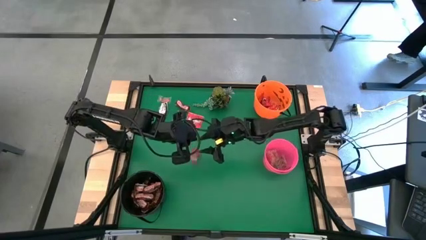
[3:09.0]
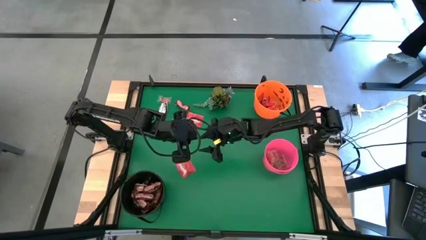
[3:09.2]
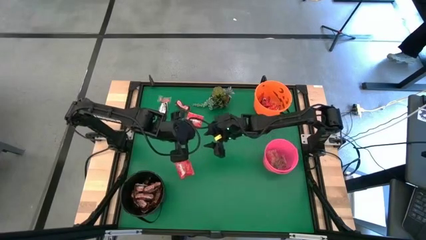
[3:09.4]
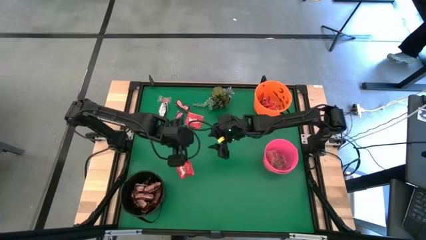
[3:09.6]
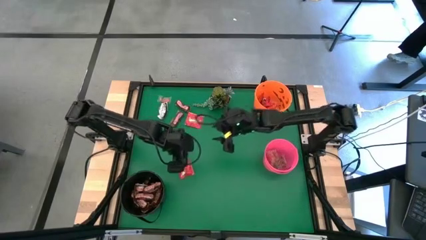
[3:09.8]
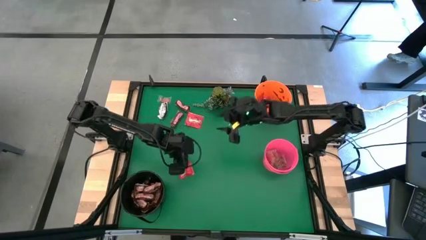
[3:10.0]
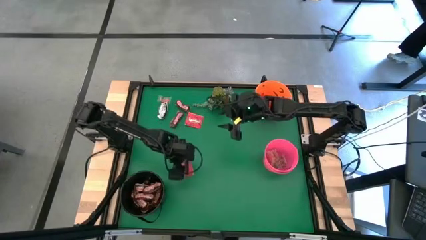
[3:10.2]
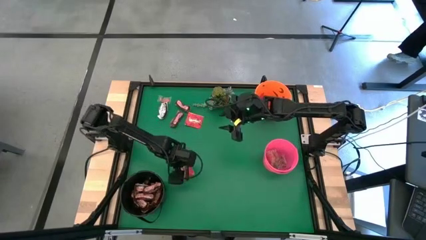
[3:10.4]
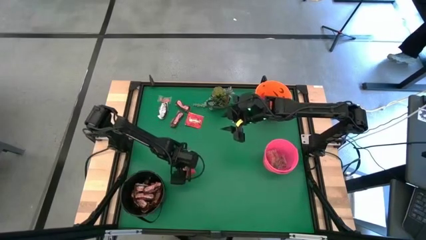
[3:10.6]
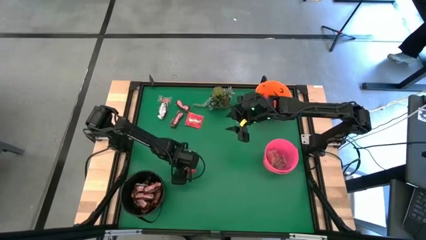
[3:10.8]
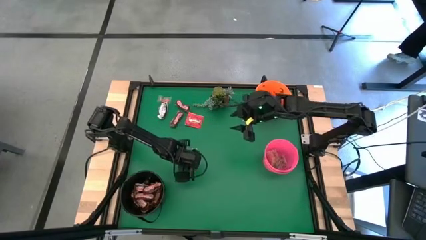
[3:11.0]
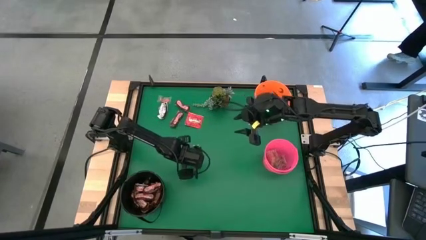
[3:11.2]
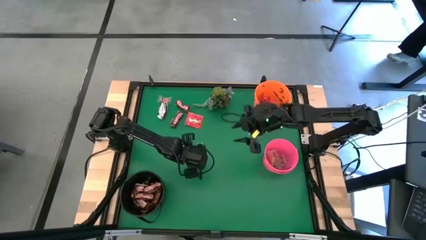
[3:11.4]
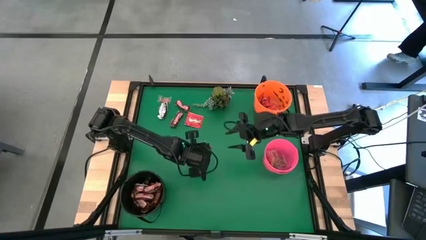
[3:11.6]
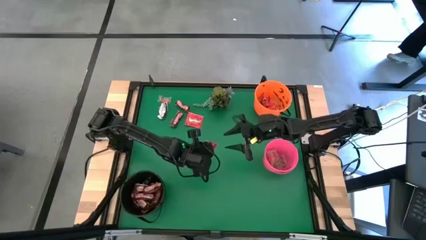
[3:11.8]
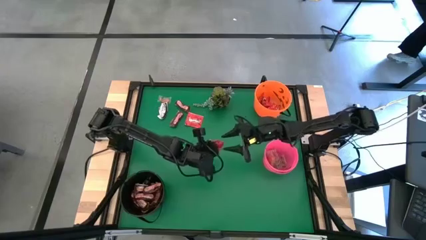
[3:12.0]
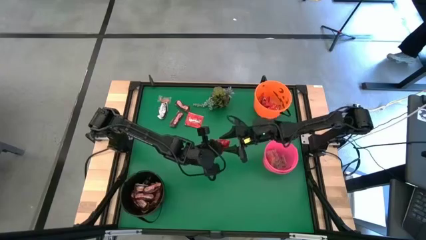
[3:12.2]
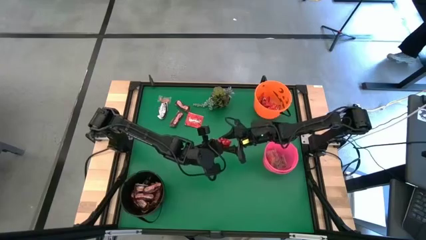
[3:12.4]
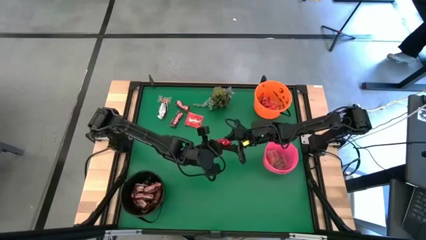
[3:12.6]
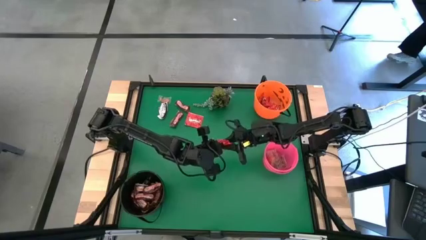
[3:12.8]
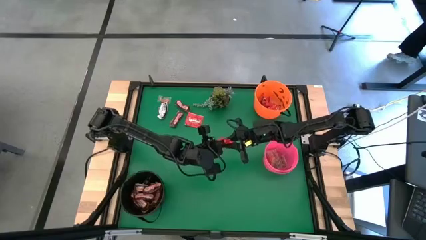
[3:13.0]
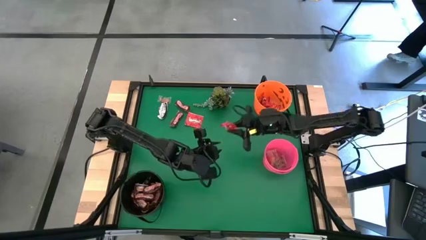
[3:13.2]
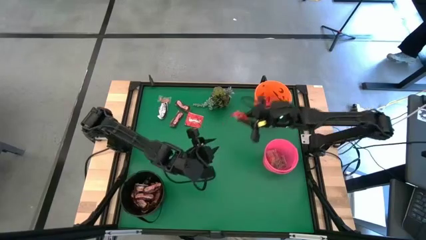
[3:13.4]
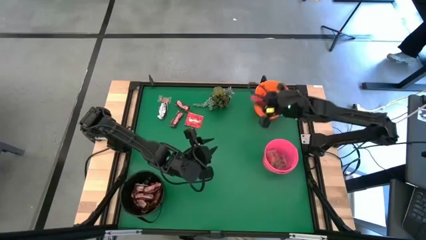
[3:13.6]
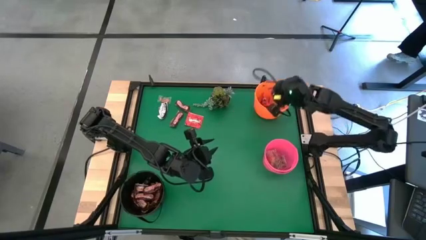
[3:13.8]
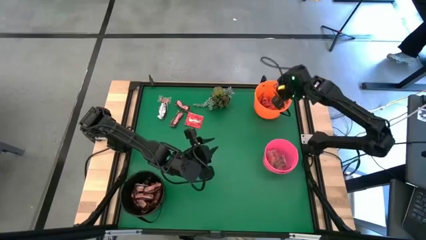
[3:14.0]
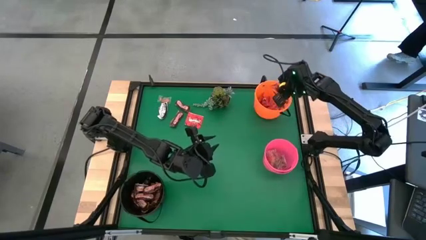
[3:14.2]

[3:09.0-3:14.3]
Task: Sort candy
Put the red candy into the orange bucket

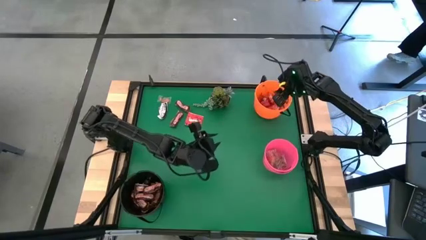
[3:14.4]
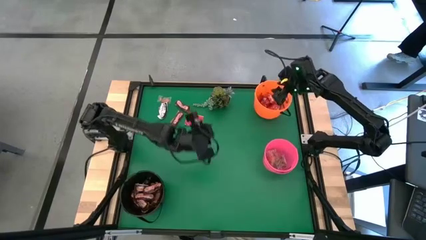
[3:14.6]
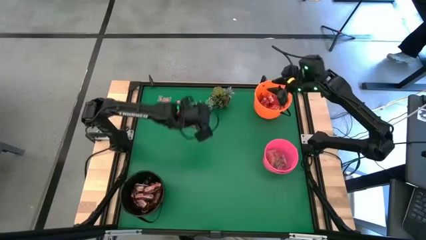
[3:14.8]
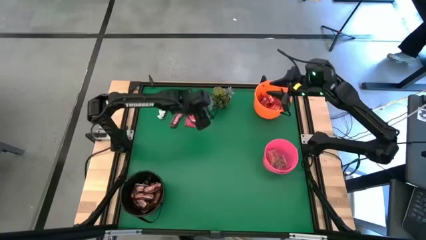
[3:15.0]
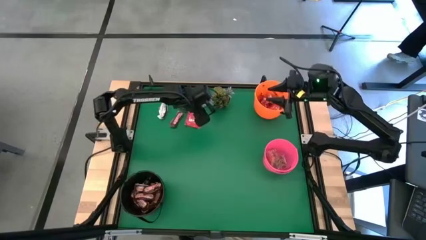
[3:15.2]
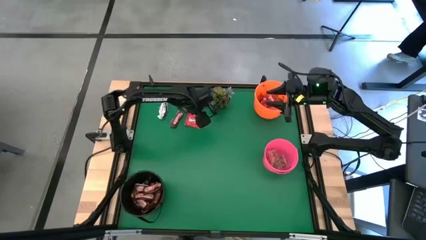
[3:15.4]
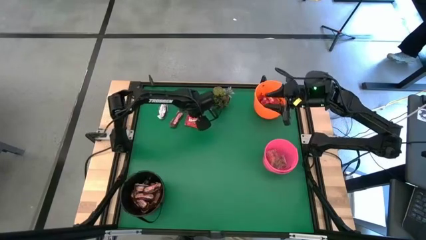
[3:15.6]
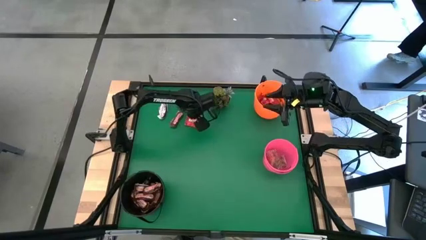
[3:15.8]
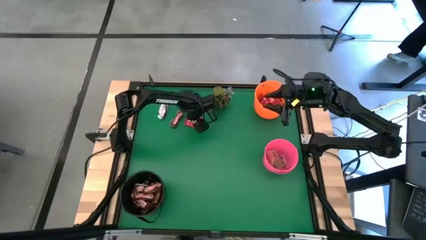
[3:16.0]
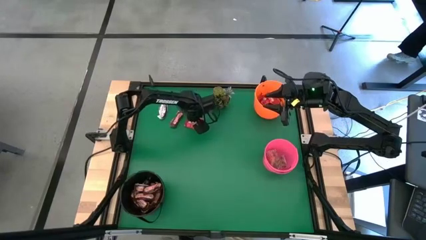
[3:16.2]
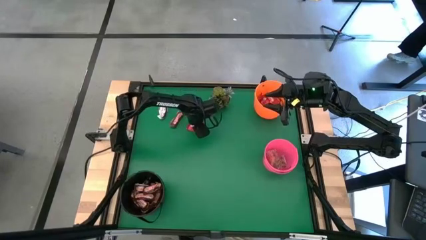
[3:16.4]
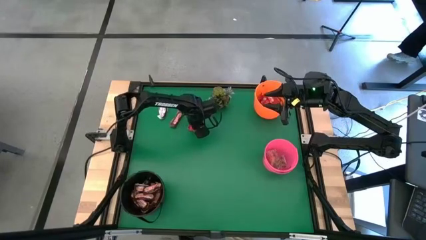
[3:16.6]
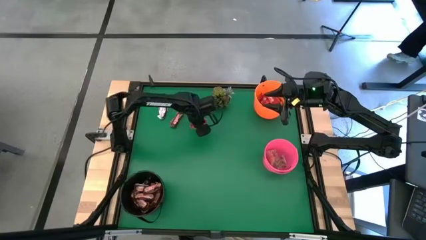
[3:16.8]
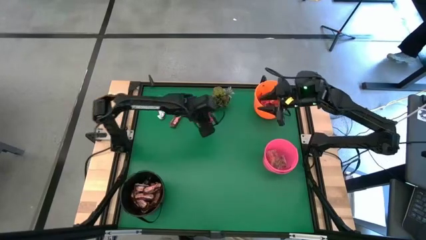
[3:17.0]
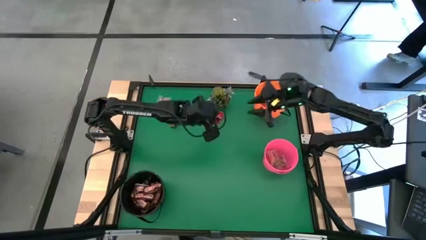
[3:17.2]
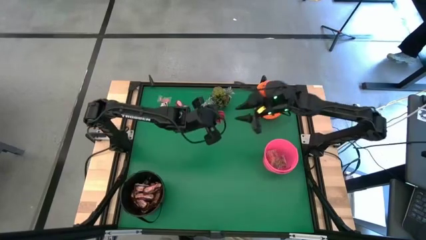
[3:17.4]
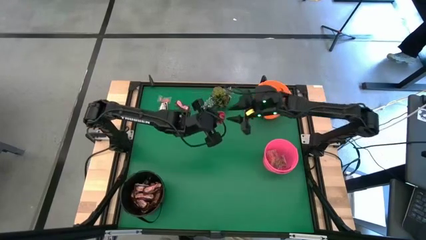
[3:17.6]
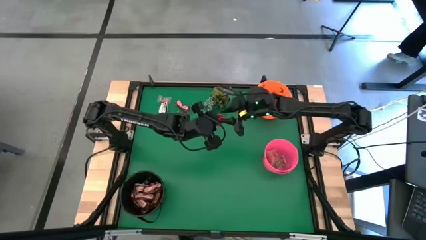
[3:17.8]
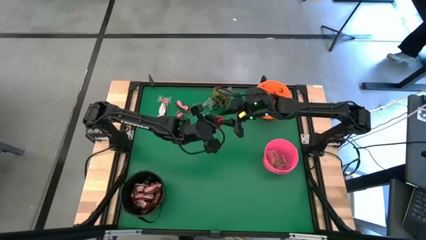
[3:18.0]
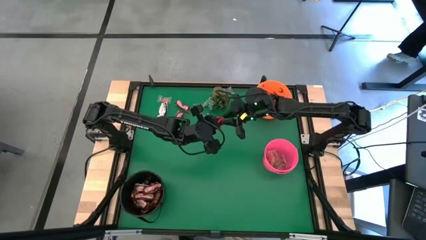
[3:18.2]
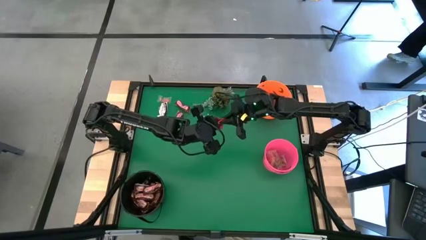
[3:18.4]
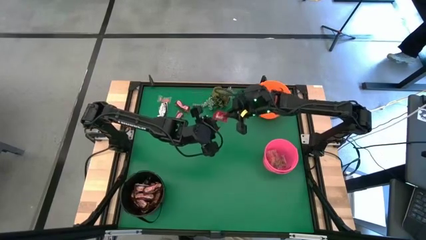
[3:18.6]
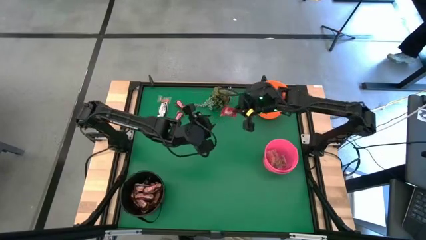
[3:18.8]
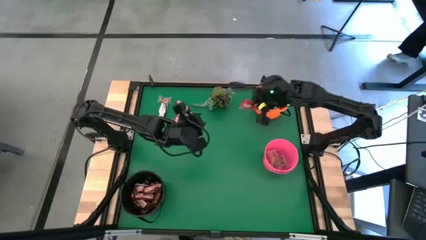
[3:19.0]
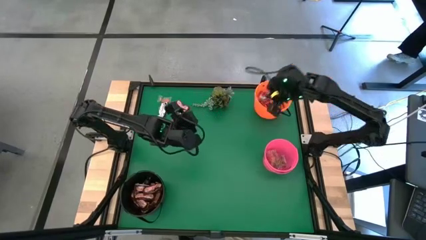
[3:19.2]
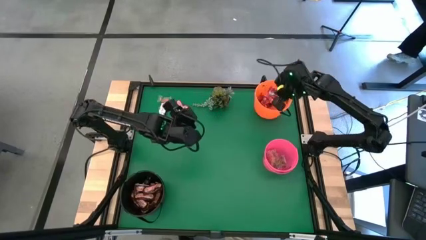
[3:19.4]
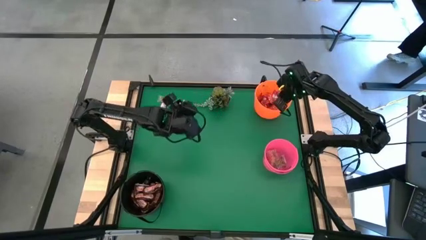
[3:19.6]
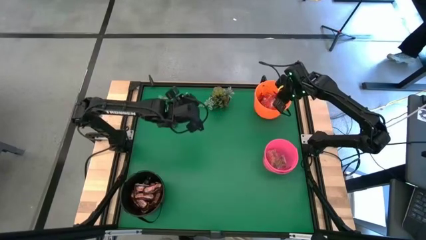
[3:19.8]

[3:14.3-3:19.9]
Put the red candy into the orange bucket

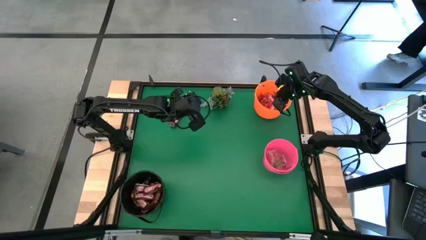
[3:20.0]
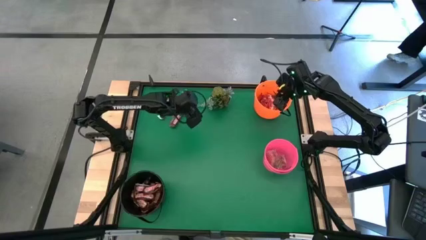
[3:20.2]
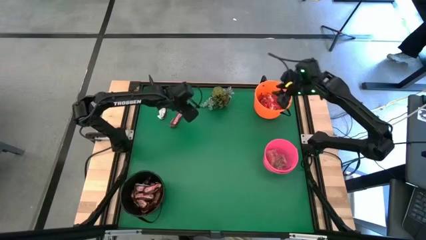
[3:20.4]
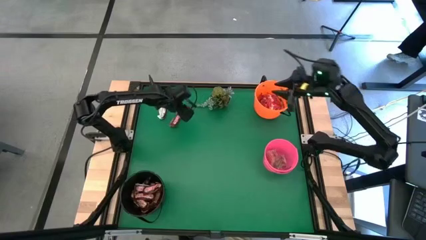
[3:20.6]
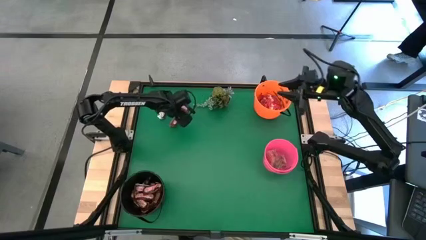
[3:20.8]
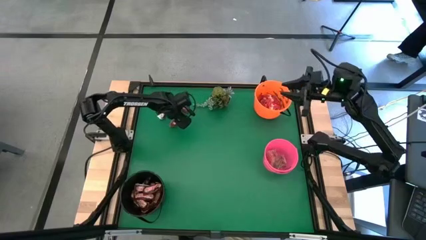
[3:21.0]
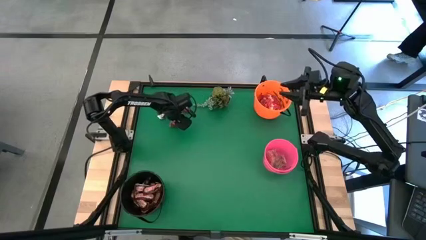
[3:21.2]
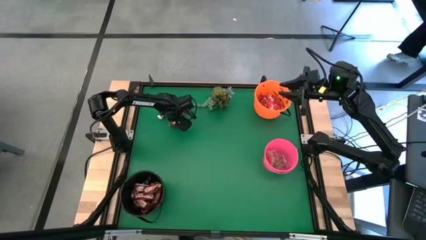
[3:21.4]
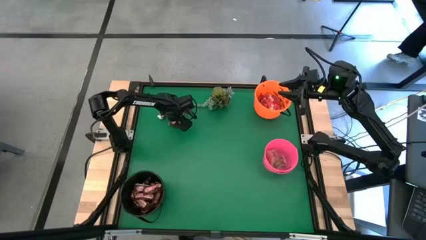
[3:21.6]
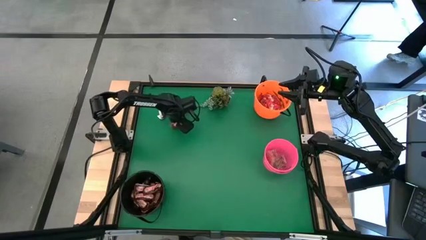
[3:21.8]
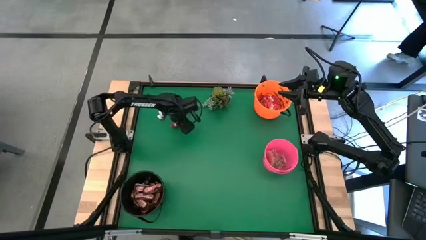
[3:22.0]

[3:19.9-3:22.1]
Put the brown chocolate bar into the black bucket

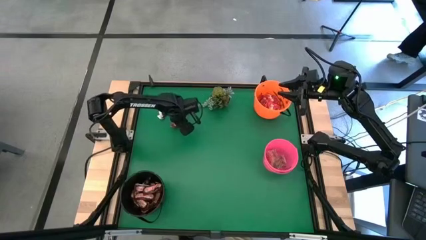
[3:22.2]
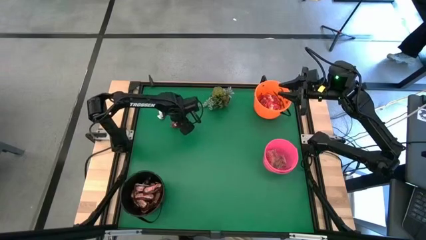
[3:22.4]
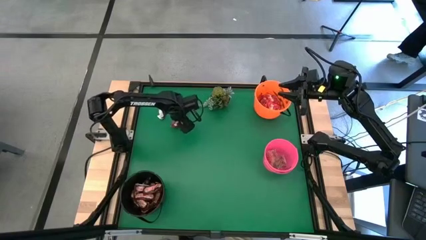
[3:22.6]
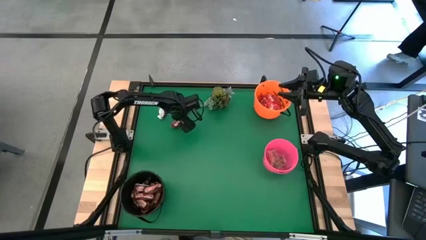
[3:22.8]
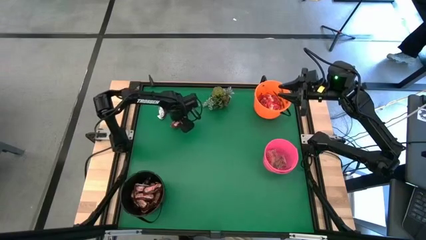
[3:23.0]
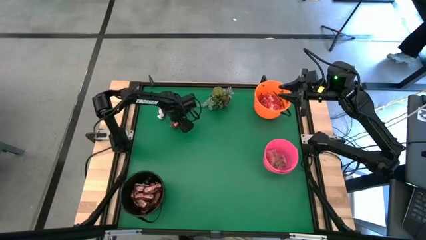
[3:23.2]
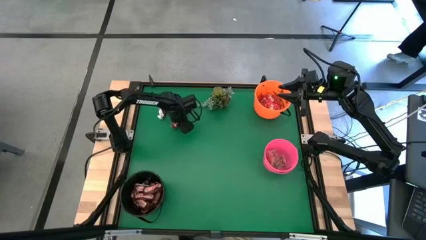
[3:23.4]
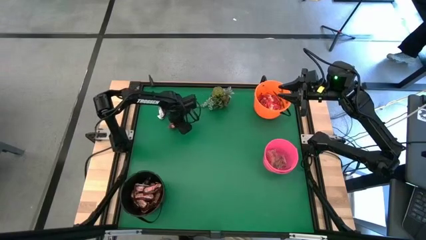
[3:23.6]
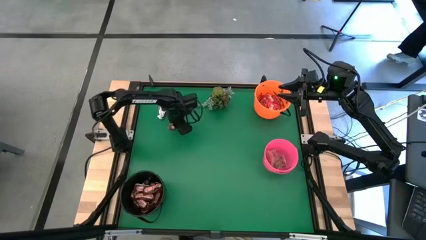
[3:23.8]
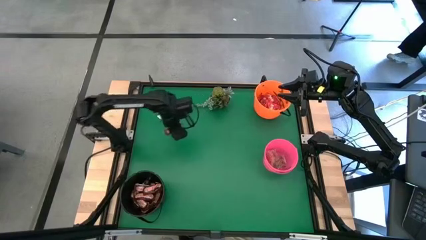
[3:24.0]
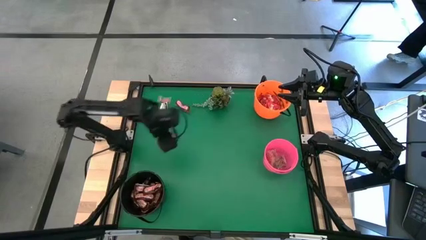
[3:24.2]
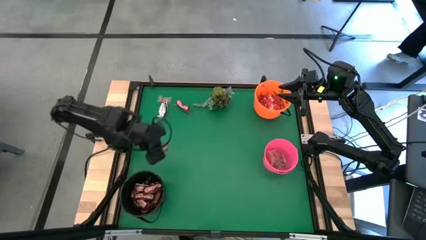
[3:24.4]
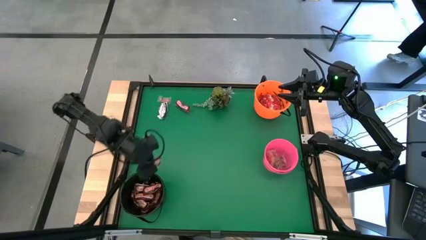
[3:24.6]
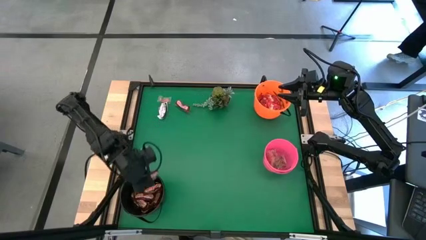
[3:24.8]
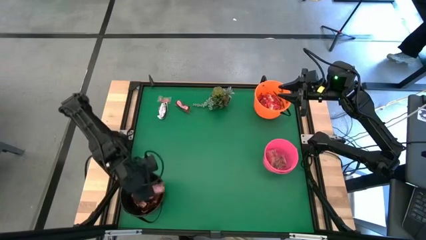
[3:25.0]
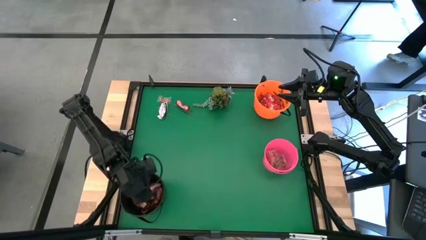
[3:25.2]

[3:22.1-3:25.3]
Put the brown chocolate bar into the black bucket

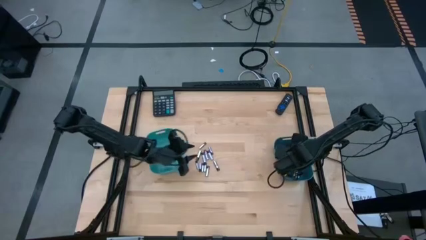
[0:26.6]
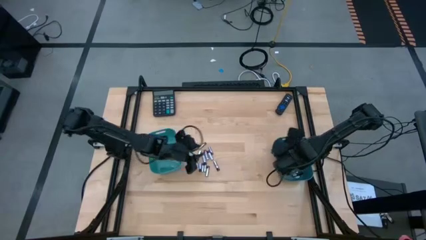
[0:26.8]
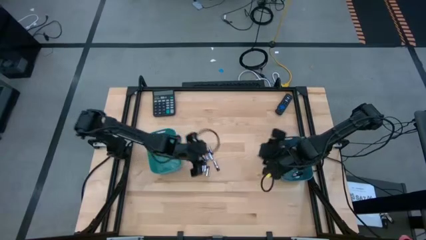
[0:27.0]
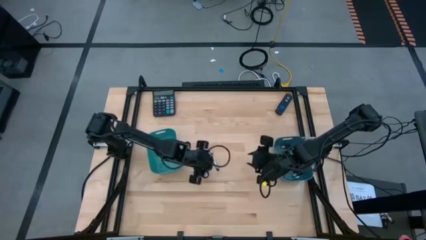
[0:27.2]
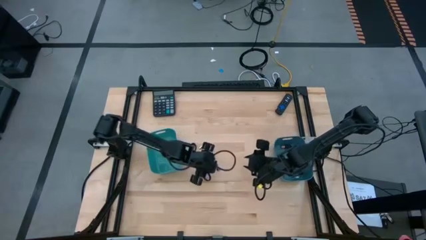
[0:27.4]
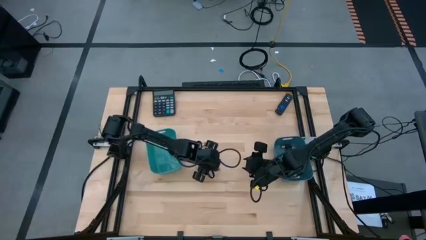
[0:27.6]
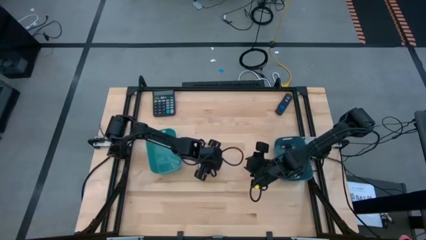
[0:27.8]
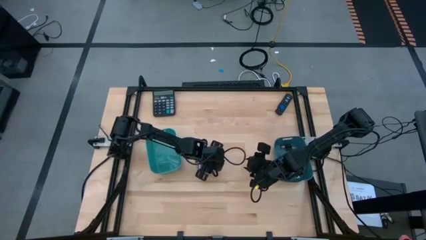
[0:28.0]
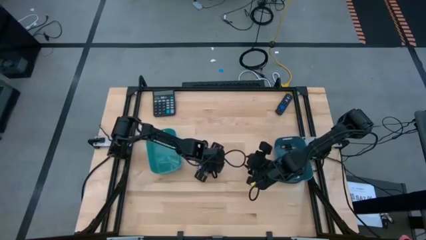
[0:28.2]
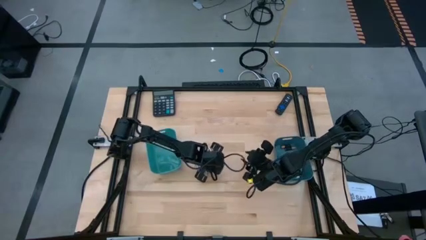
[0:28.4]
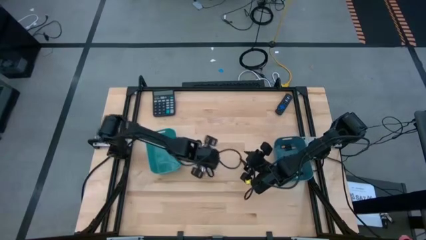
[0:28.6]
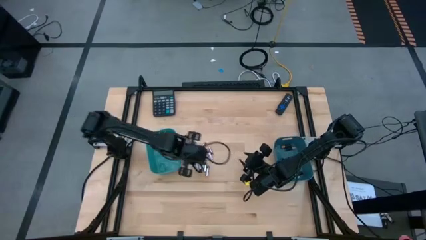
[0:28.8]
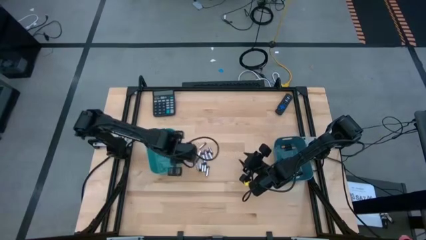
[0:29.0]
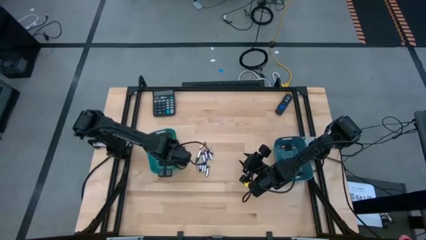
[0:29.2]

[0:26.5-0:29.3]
Task: Sort batteries
Put the black battery into the right blue bin
